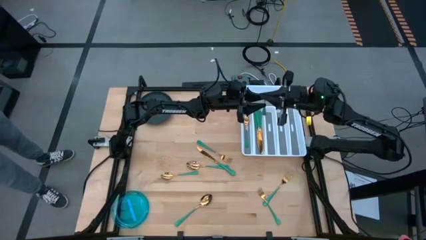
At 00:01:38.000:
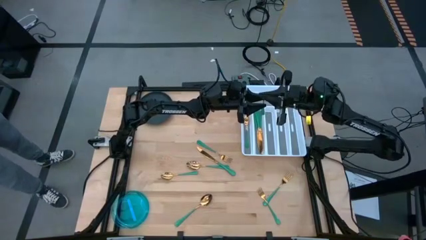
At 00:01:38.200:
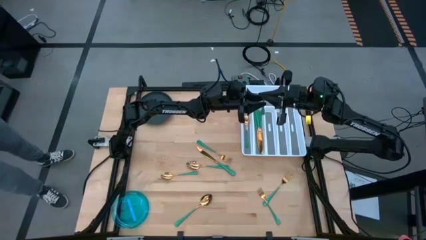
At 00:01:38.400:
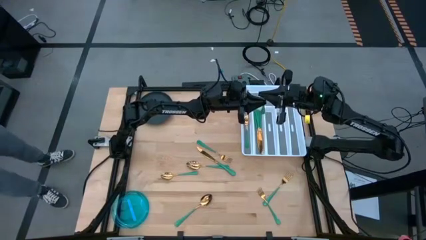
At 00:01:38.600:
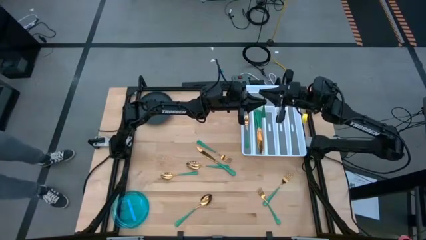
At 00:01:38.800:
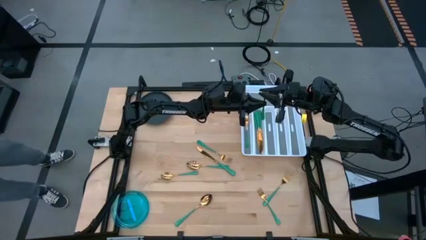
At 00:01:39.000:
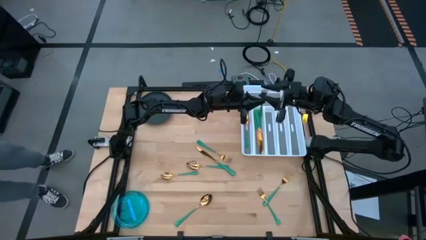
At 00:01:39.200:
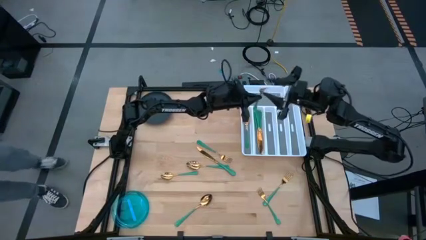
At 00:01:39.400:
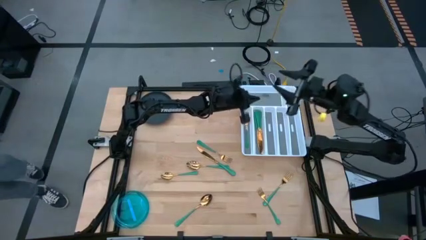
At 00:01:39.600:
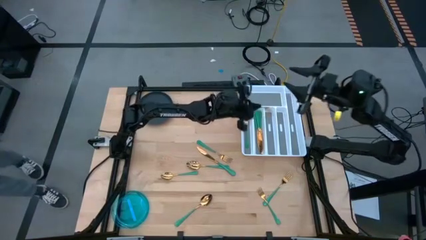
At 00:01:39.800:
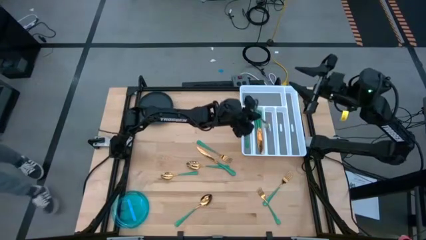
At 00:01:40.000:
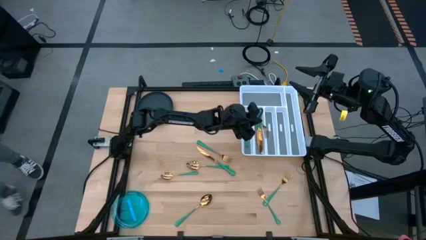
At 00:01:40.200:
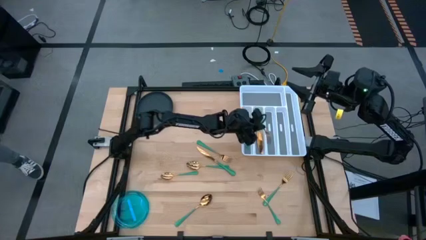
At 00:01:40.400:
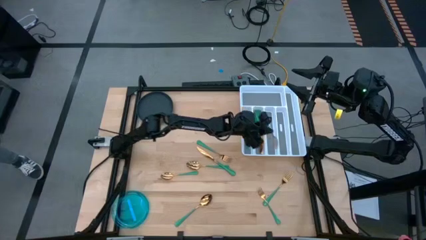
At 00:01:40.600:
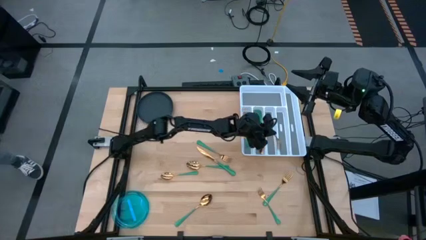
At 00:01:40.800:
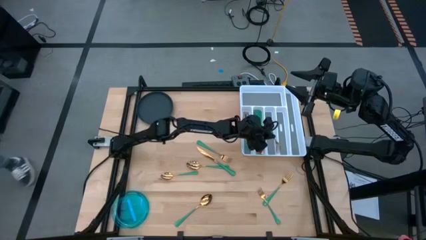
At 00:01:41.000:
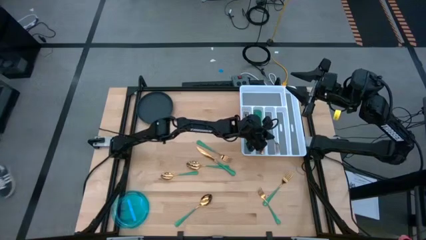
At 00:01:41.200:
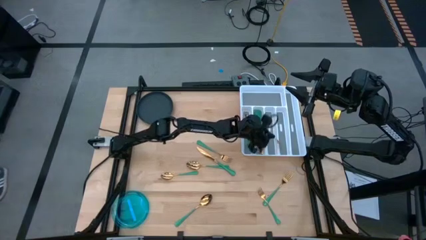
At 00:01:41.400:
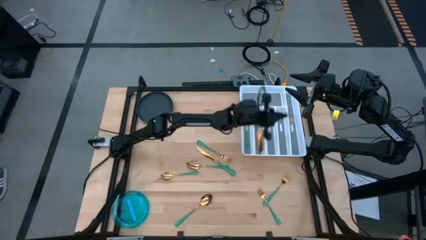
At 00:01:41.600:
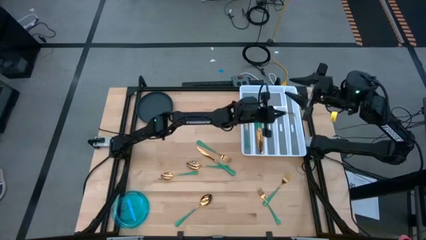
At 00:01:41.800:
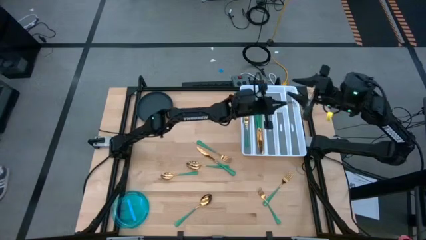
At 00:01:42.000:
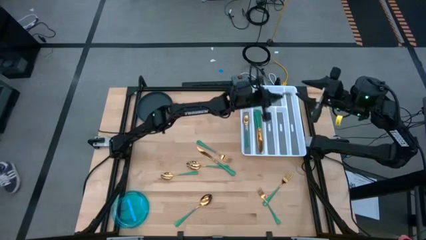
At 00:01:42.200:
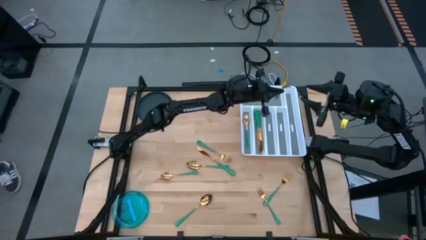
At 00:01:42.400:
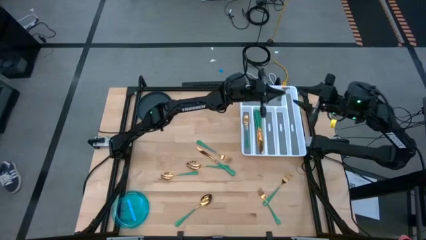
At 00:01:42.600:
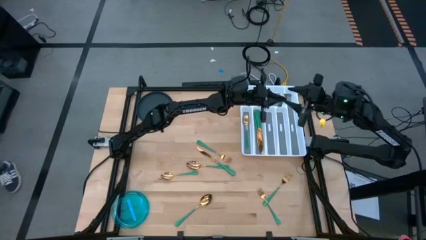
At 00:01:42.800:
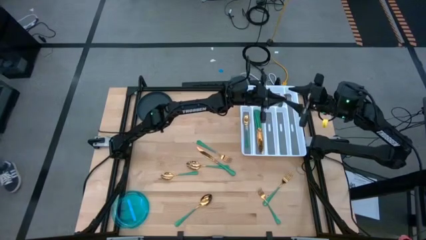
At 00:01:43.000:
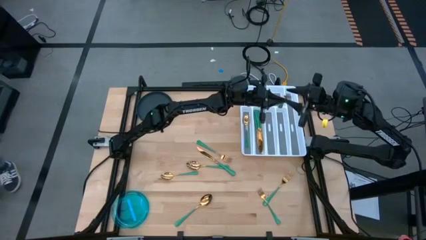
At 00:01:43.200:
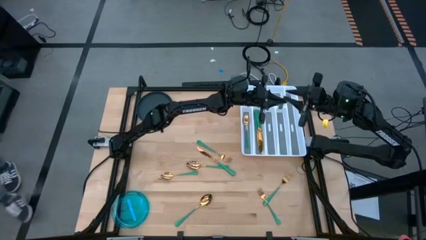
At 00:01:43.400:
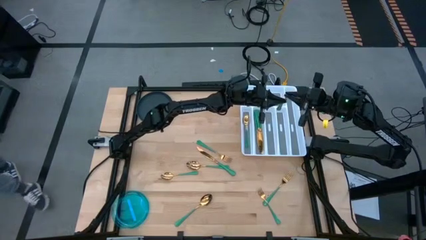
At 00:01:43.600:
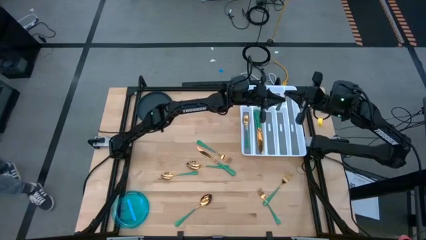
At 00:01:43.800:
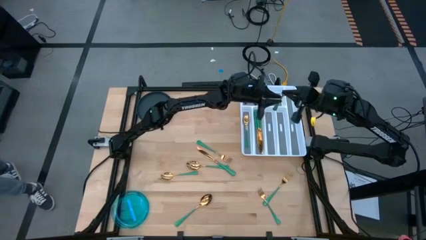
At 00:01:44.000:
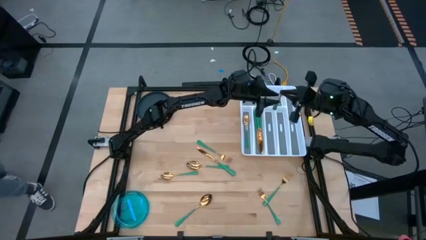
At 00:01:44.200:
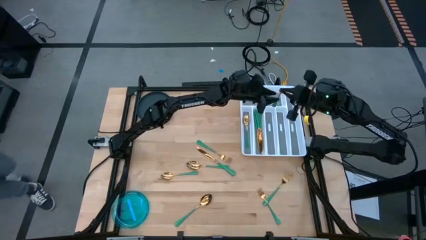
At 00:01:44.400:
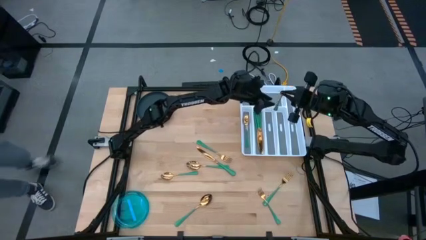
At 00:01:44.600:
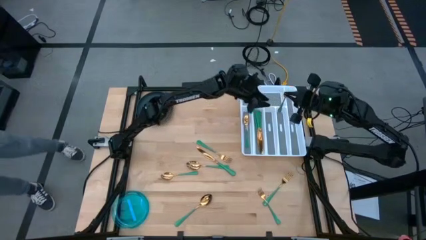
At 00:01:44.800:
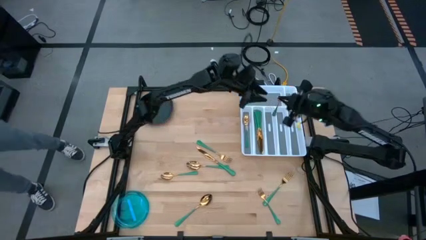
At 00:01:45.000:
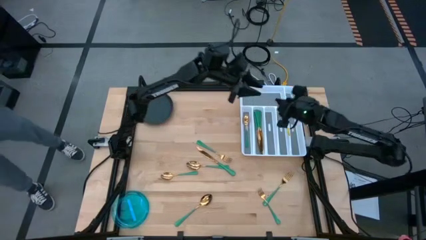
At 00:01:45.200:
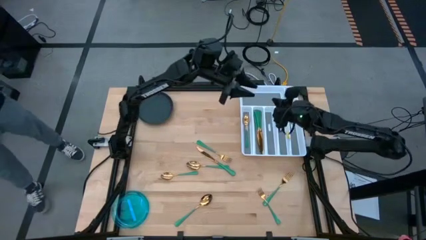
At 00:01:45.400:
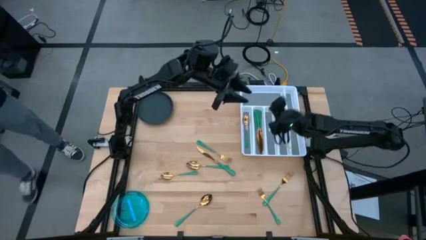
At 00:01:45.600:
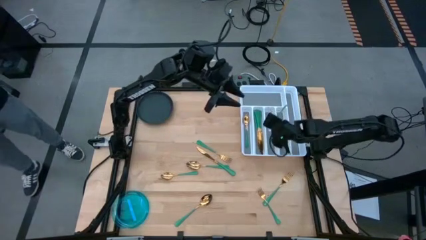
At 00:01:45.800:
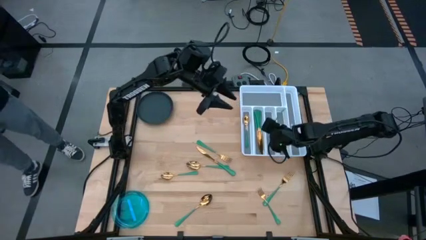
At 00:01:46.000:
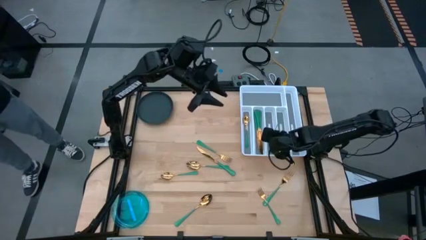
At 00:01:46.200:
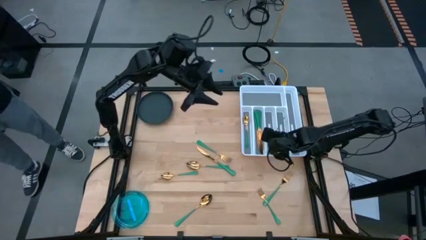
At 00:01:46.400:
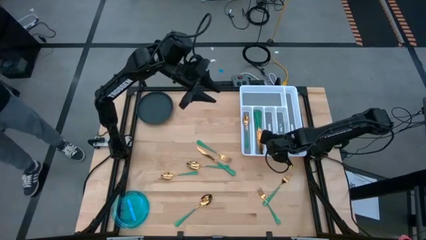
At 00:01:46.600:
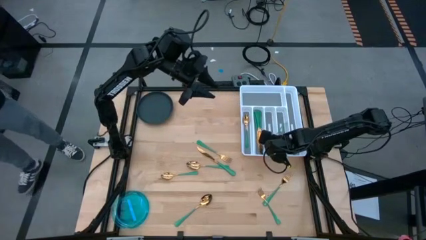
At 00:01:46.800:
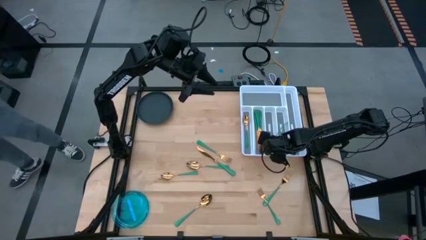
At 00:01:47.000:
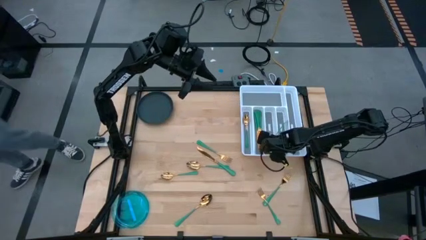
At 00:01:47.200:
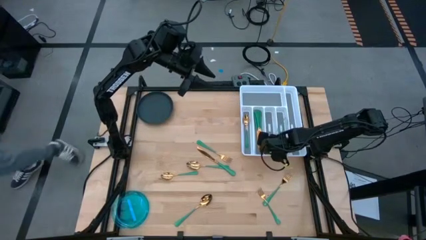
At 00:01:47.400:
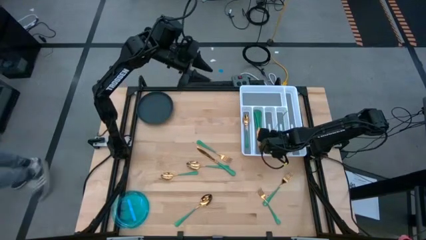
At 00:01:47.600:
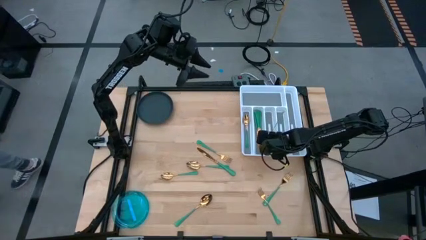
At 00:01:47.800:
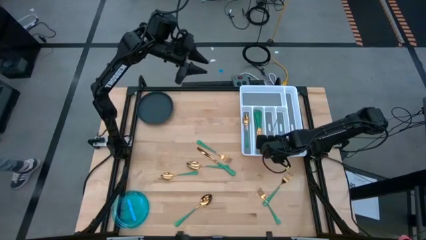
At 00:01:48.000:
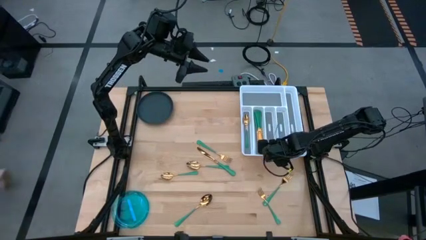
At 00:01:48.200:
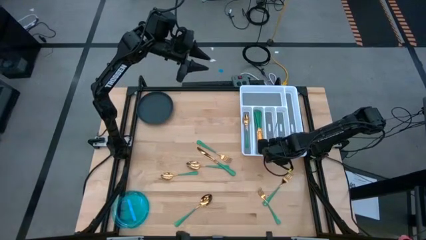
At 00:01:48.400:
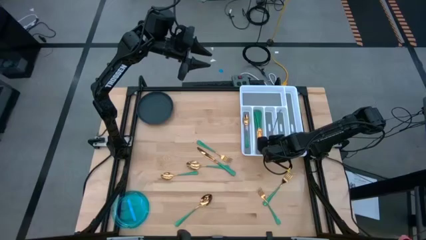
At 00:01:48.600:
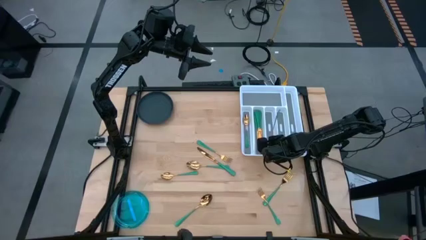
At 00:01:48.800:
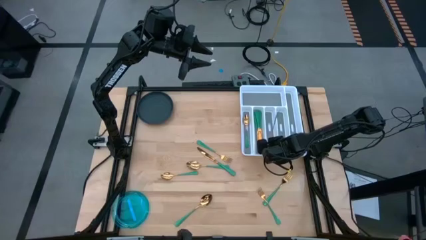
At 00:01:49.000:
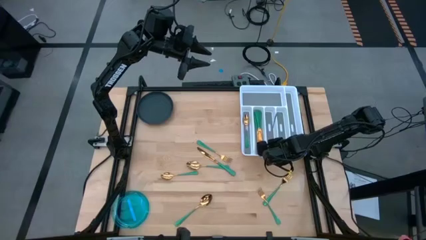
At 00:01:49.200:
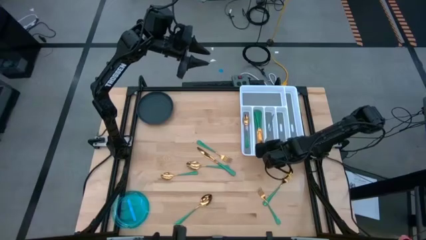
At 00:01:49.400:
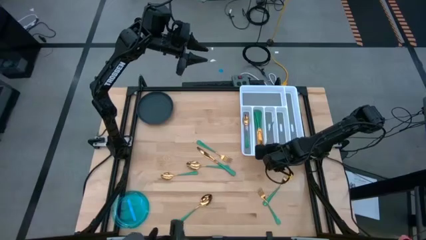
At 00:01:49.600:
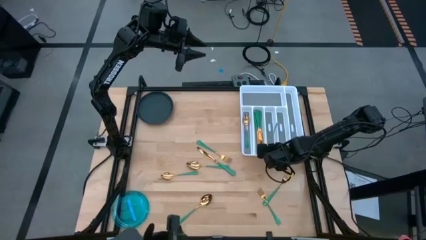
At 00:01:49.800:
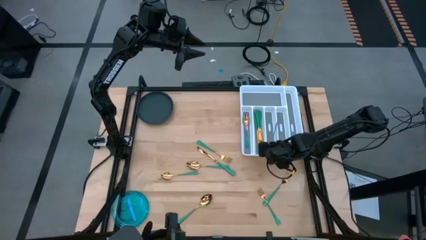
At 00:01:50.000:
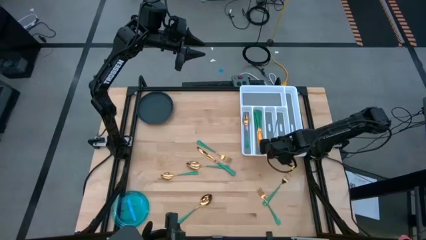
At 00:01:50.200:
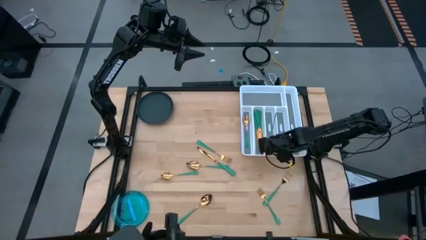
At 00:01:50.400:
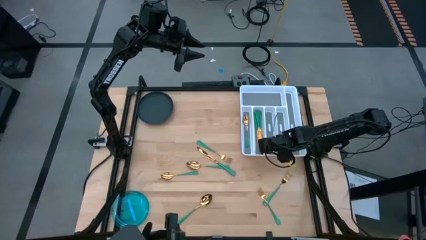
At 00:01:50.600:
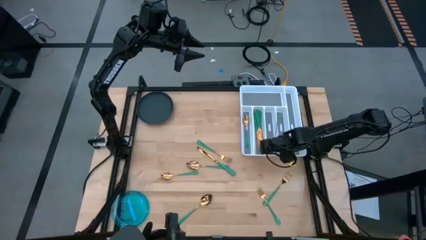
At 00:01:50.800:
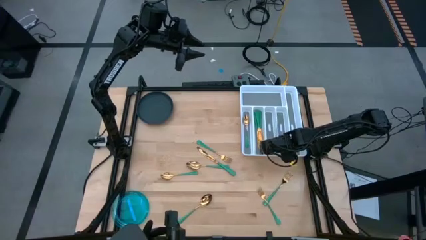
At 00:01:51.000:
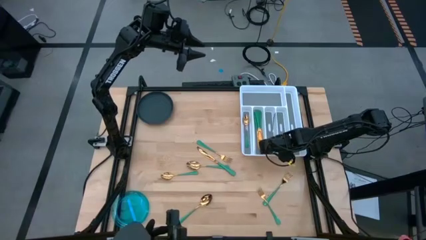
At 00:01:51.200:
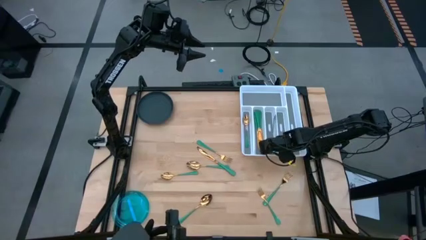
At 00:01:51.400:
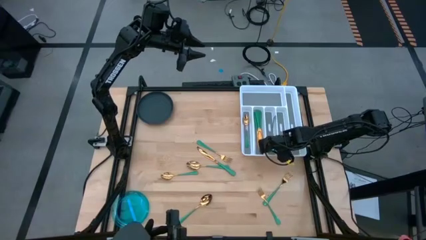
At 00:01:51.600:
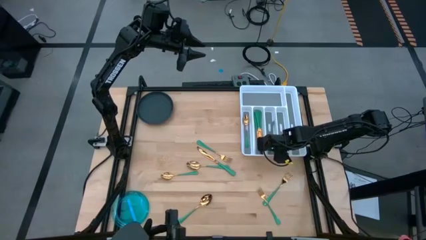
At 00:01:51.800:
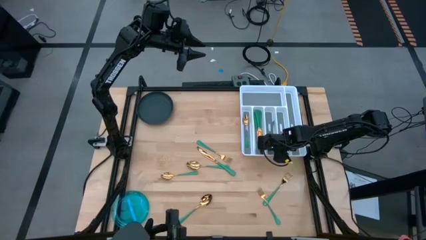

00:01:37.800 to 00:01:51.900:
Task: Sort silverware
Put the green fork into the silverware tray
